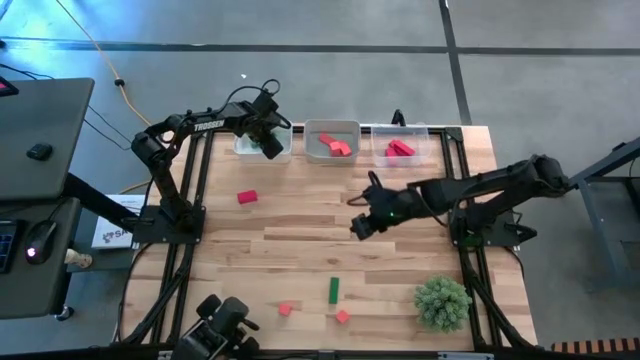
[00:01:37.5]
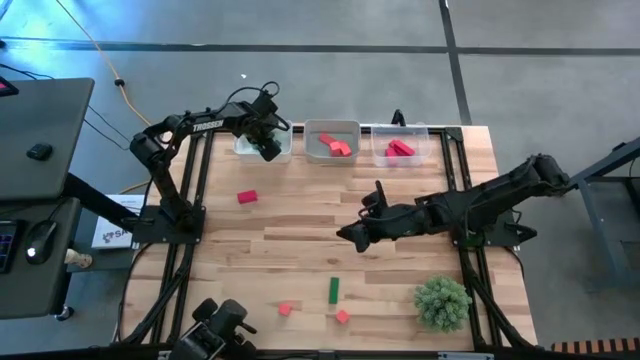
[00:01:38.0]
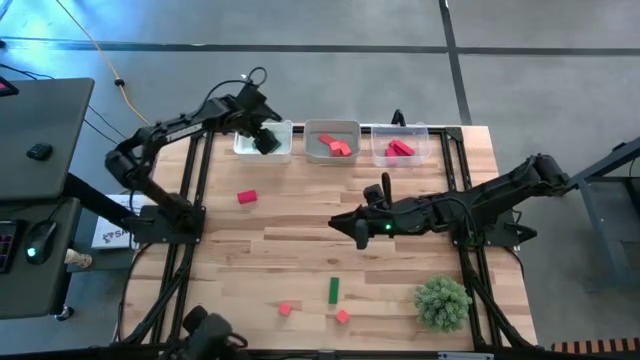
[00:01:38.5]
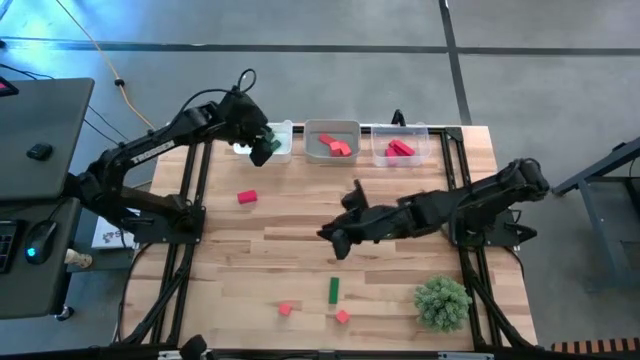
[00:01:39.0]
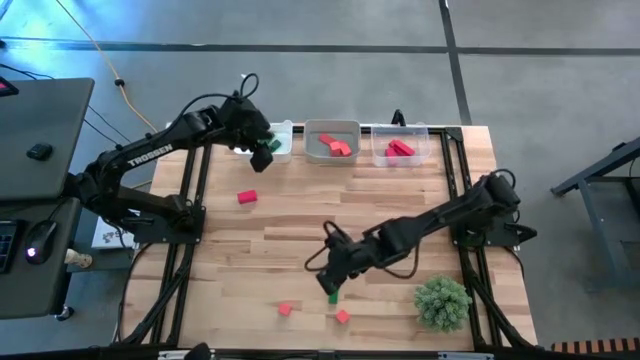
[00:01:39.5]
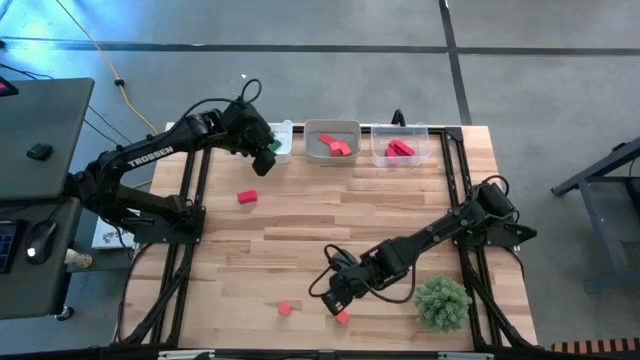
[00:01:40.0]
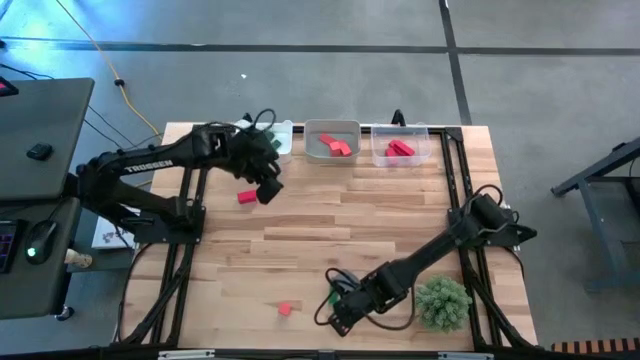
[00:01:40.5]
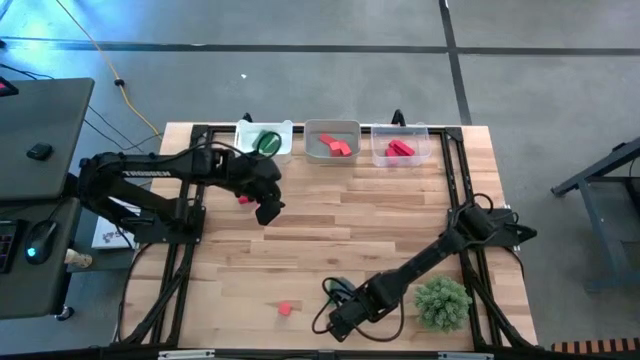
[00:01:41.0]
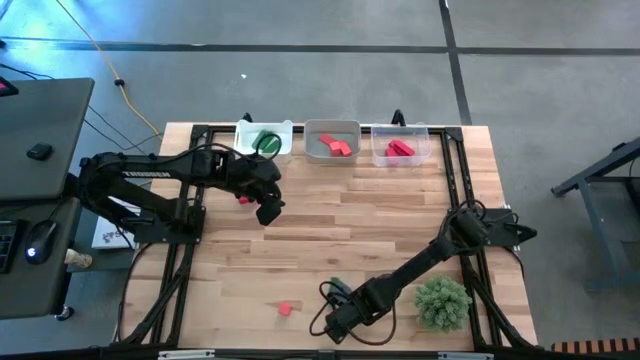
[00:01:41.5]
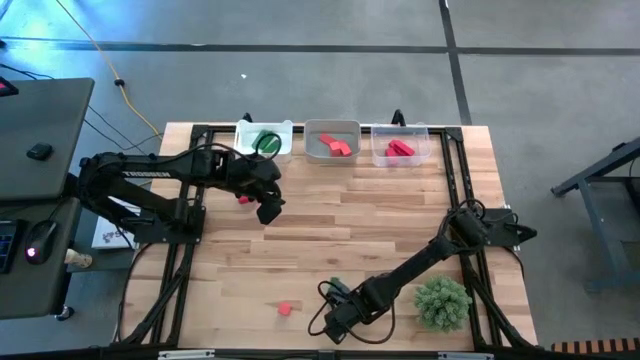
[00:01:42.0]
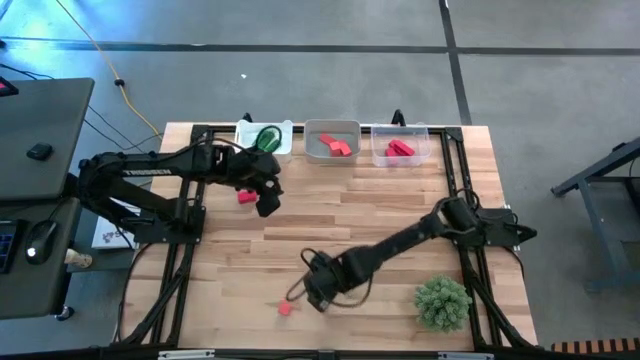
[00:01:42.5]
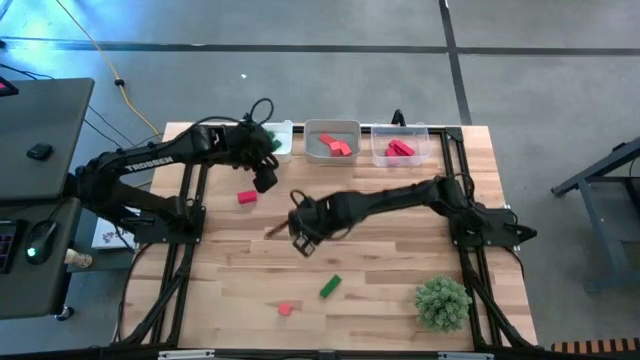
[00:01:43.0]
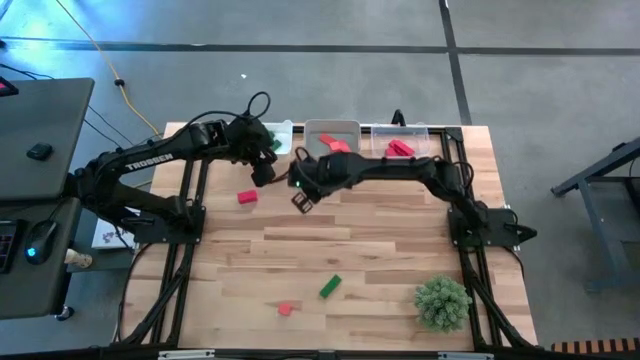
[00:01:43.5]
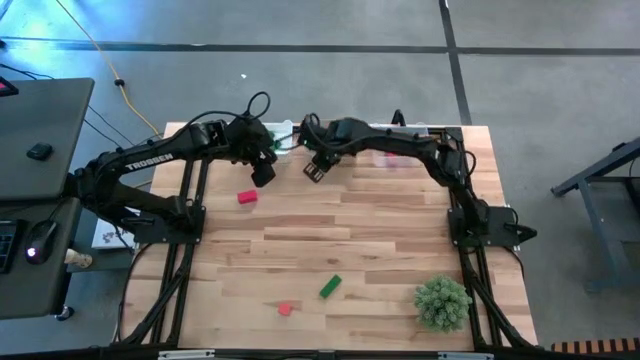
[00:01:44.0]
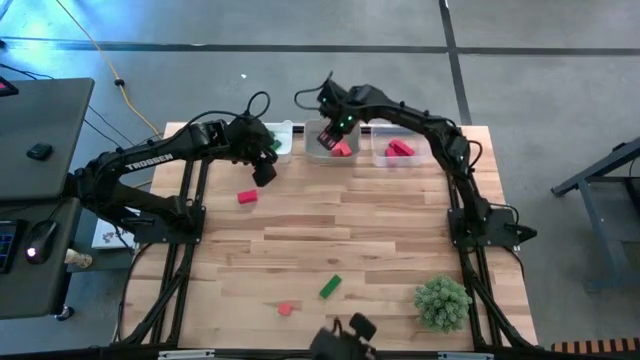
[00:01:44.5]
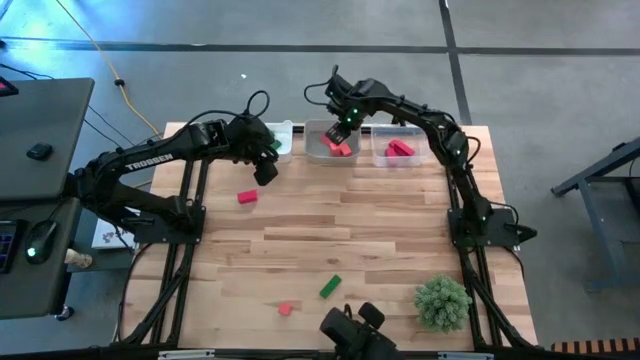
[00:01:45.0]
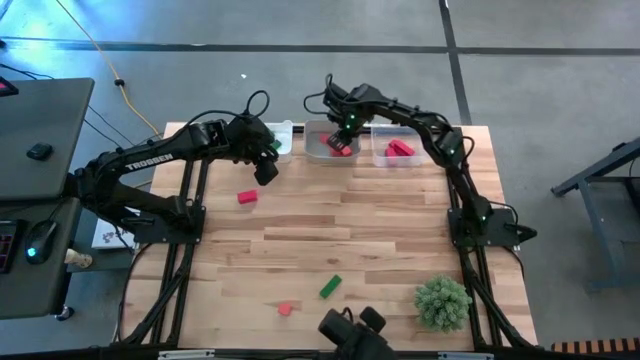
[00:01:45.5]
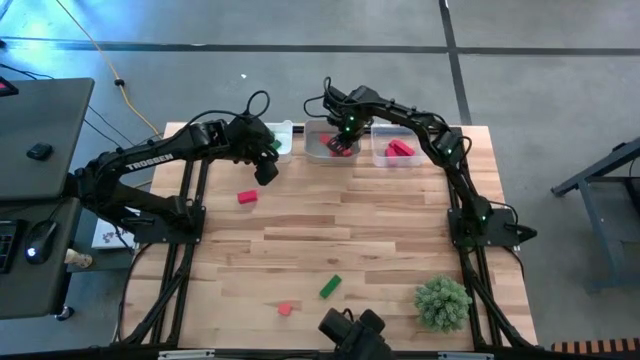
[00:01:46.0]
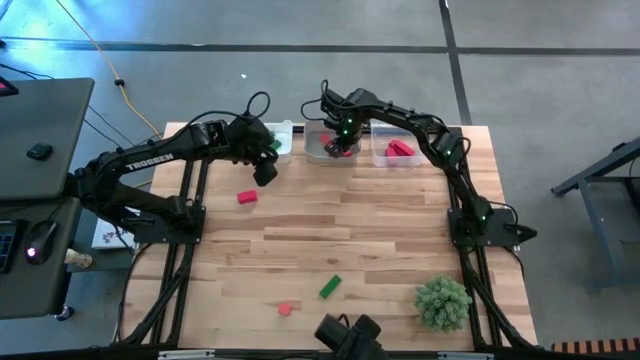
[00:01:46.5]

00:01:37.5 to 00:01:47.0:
Task: Sort & place blocks by color
Put the orange wooden block into the gray bin

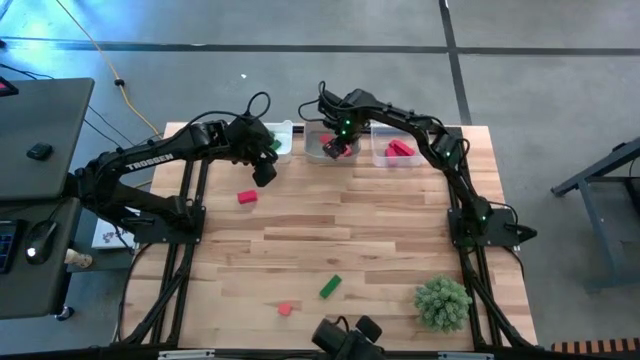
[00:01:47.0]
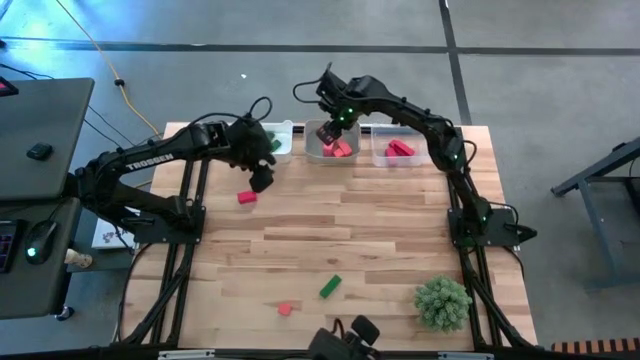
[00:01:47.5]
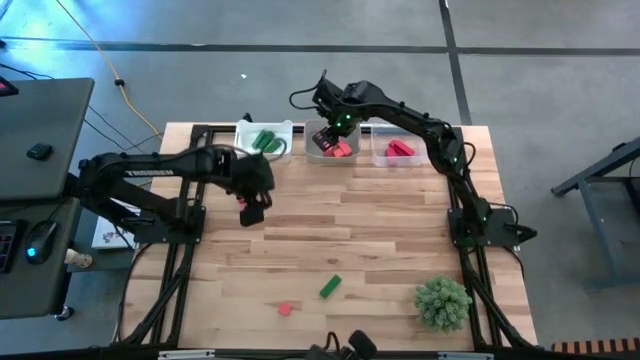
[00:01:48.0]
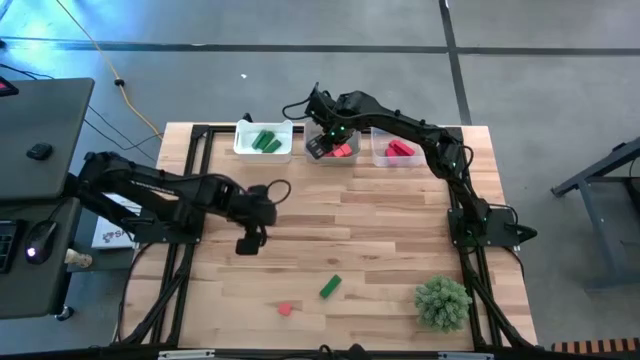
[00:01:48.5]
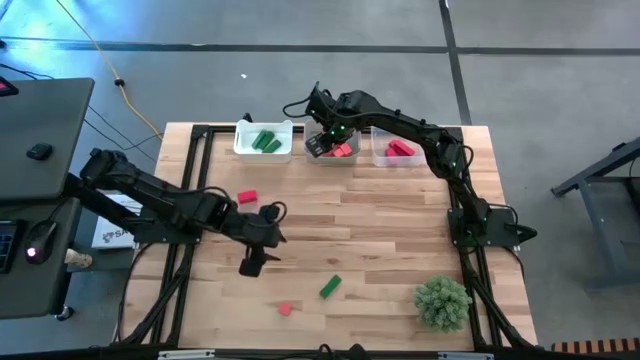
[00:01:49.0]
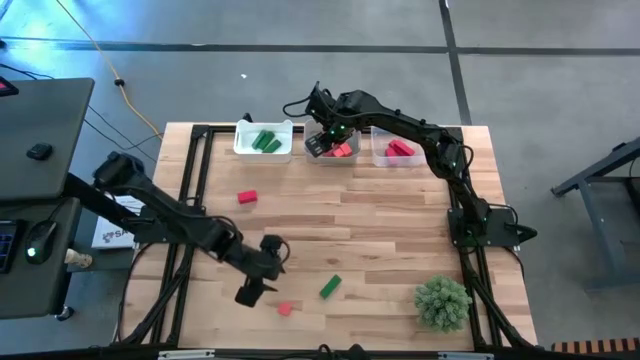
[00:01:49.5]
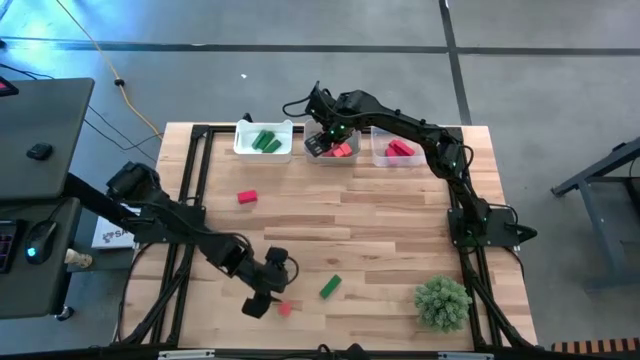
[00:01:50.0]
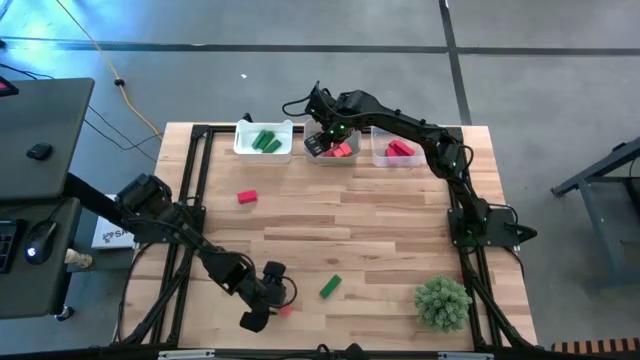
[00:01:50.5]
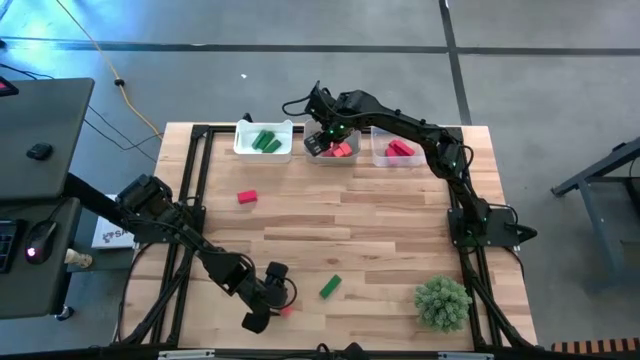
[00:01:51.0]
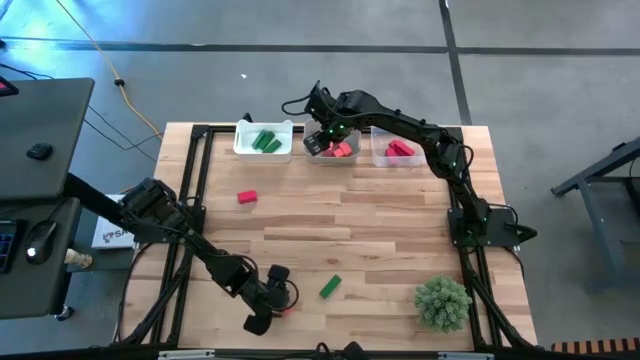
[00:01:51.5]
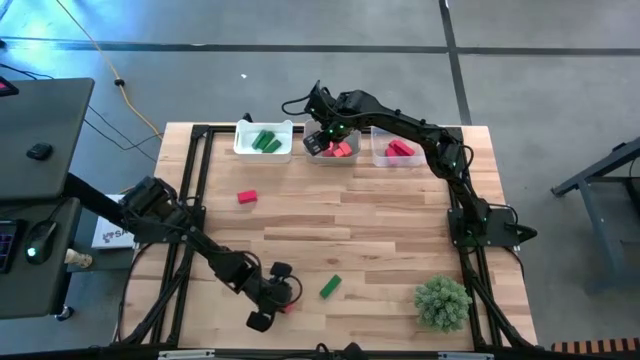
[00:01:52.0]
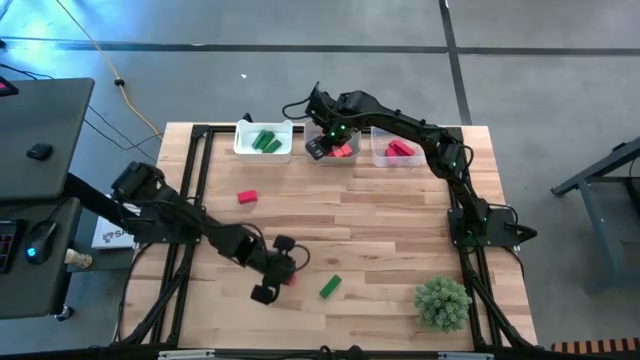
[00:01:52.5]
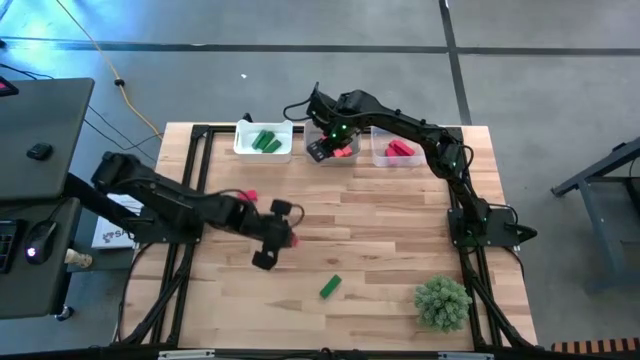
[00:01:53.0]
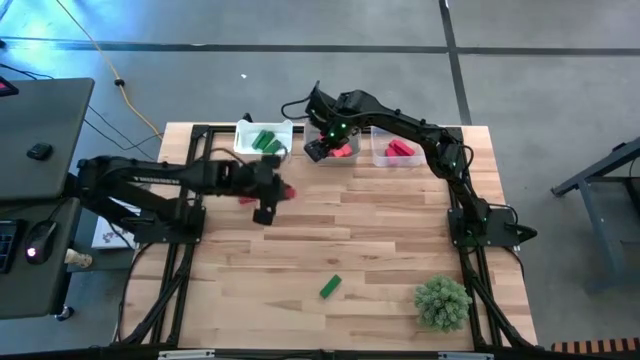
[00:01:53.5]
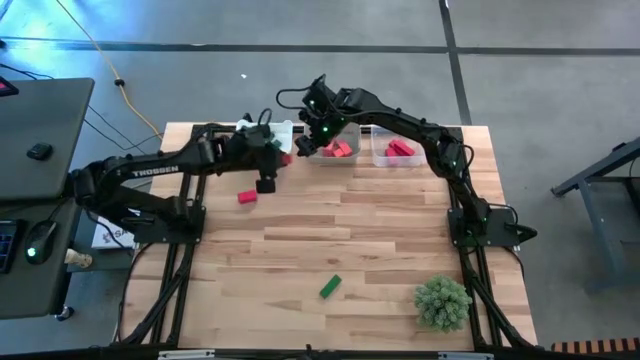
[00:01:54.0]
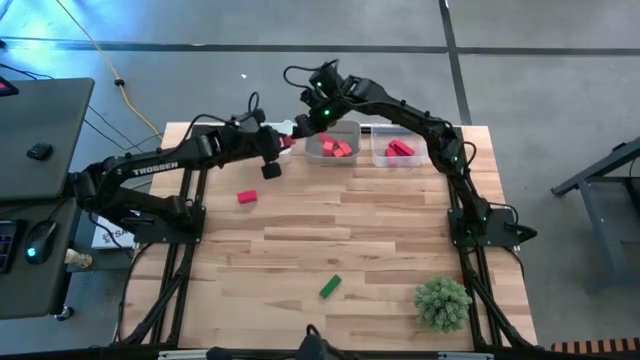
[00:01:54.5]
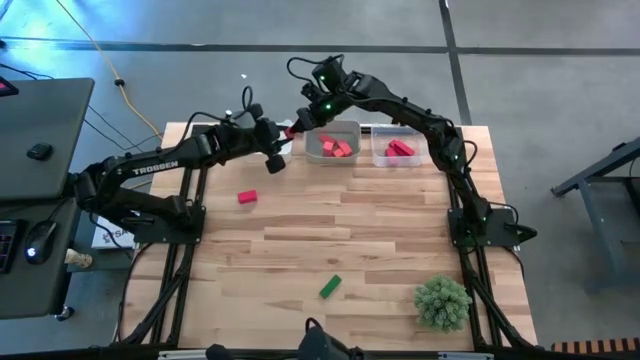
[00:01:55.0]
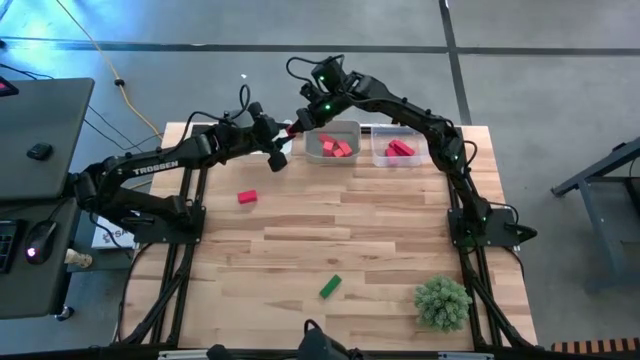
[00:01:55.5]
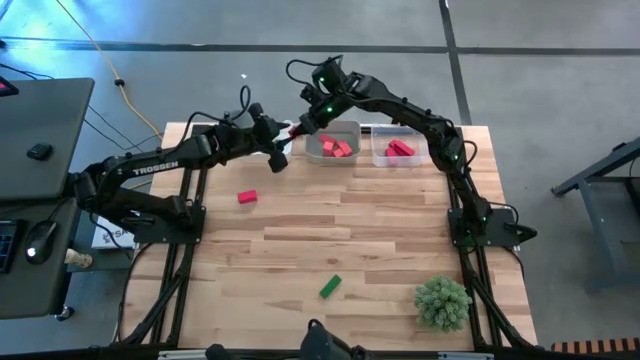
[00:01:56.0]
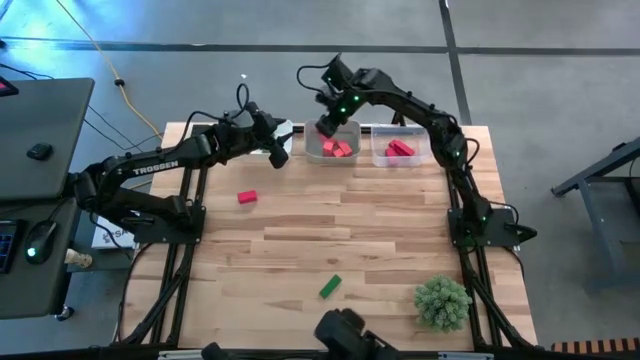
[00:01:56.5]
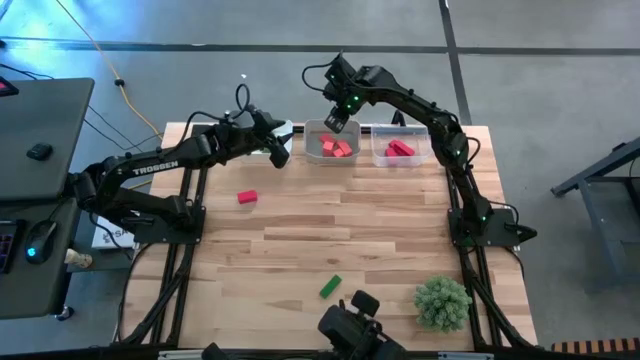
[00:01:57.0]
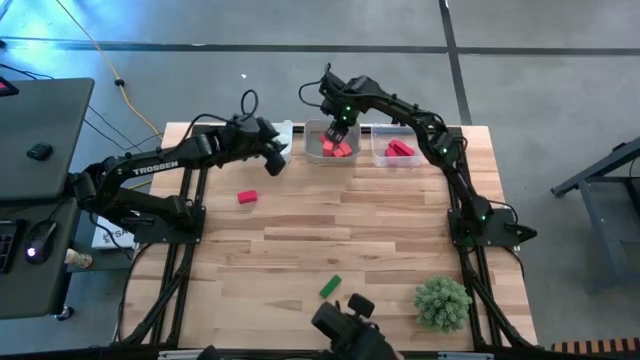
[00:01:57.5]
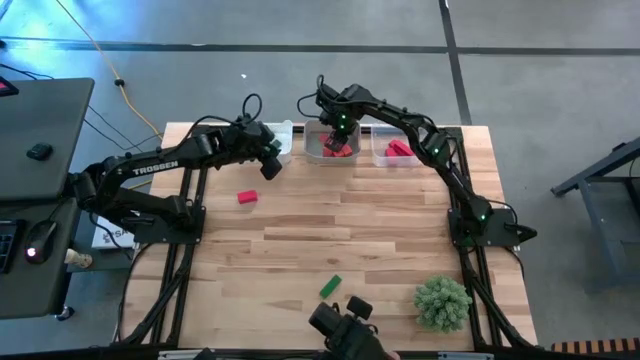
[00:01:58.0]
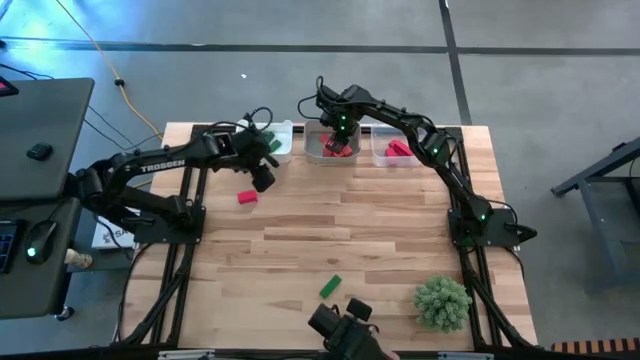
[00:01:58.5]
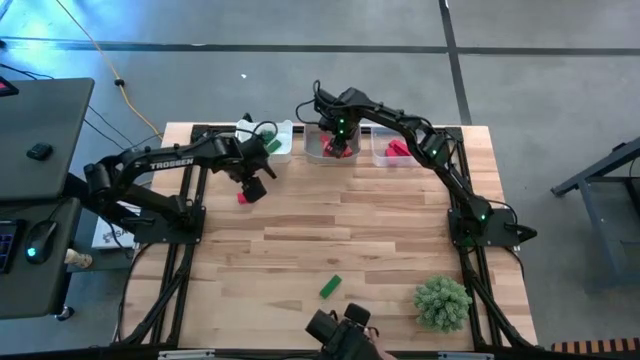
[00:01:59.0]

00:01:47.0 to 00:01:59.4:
Put the orange block into the gray bin
